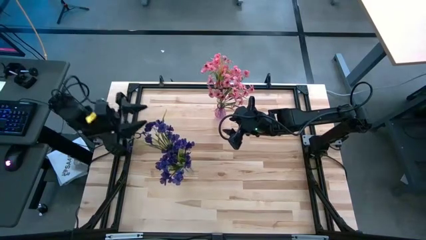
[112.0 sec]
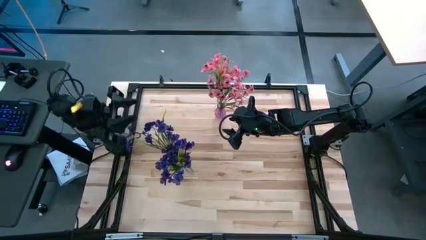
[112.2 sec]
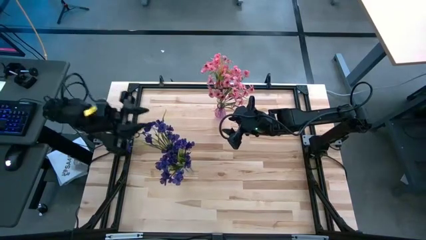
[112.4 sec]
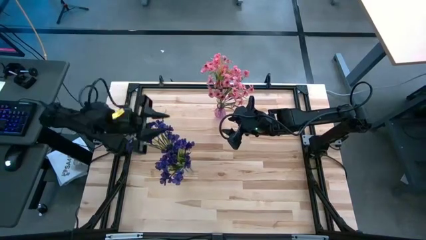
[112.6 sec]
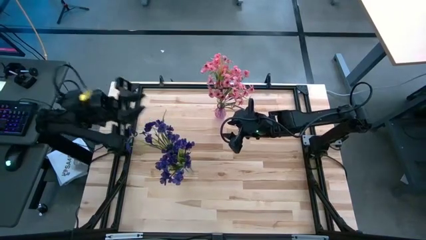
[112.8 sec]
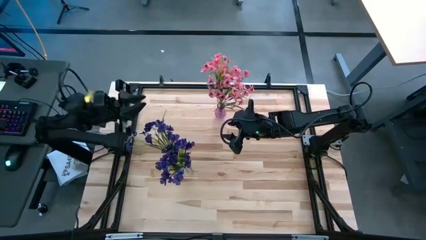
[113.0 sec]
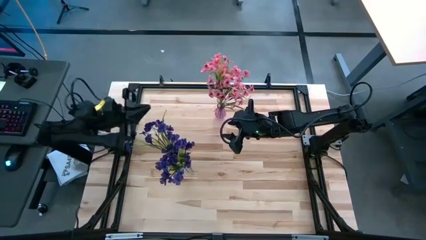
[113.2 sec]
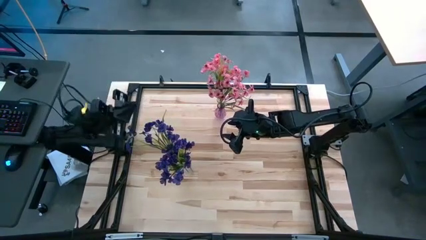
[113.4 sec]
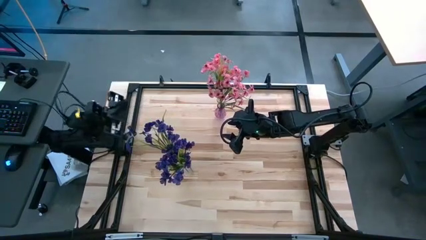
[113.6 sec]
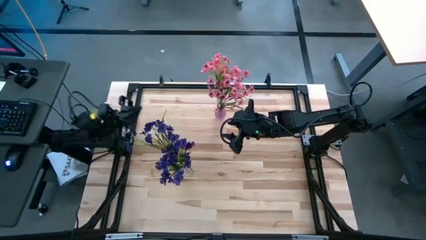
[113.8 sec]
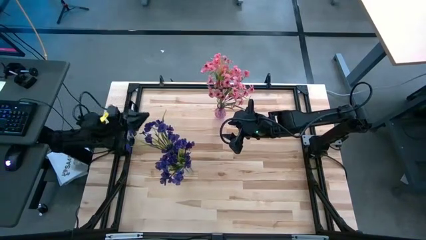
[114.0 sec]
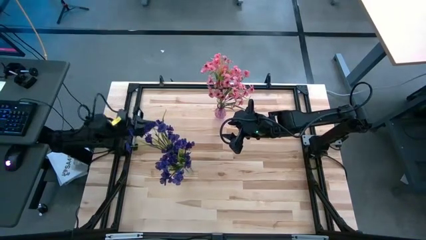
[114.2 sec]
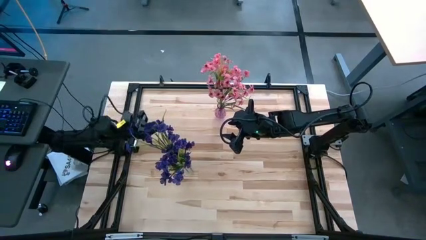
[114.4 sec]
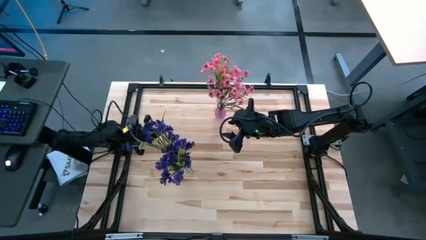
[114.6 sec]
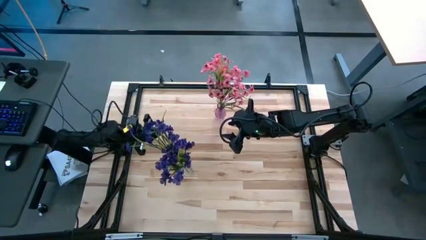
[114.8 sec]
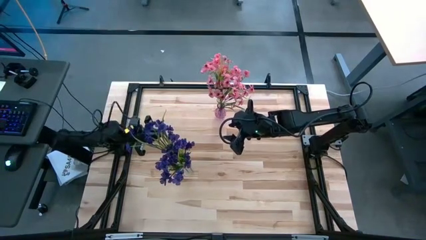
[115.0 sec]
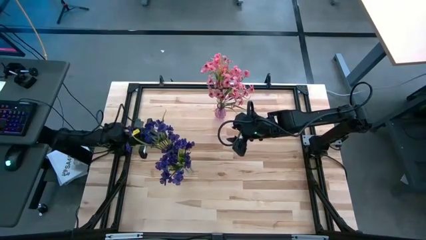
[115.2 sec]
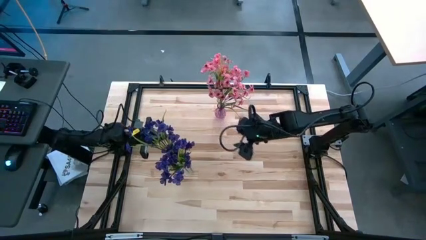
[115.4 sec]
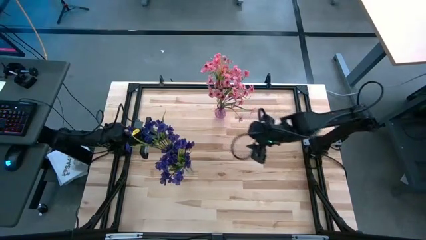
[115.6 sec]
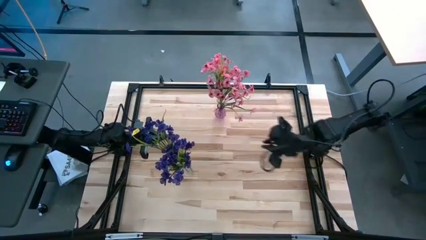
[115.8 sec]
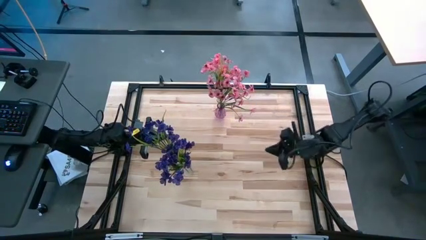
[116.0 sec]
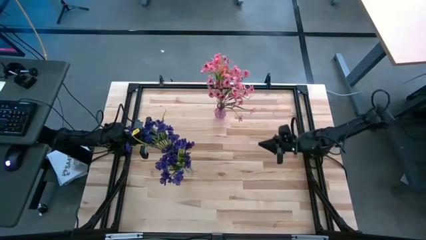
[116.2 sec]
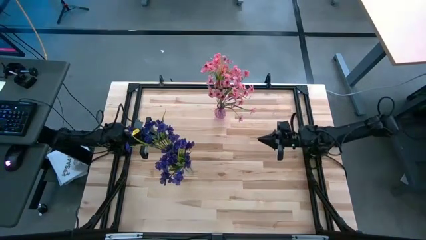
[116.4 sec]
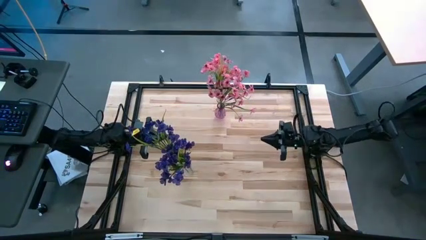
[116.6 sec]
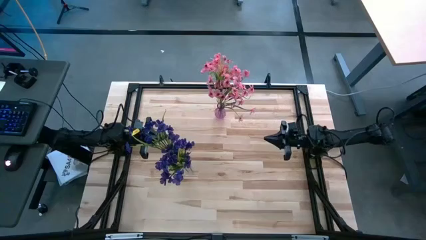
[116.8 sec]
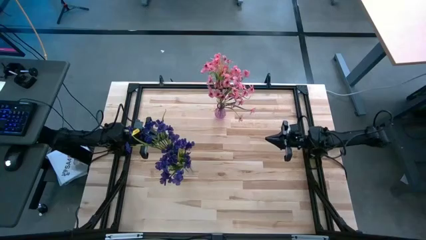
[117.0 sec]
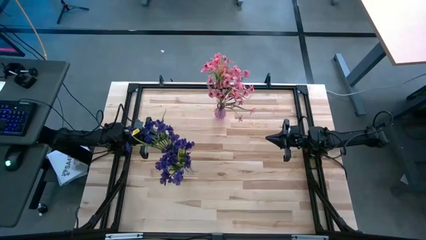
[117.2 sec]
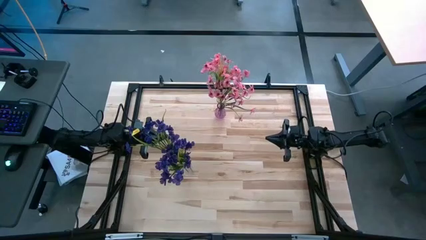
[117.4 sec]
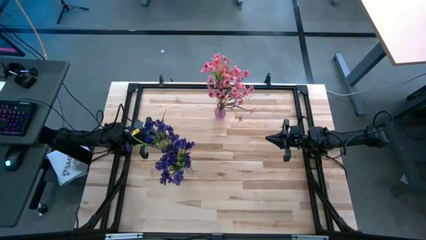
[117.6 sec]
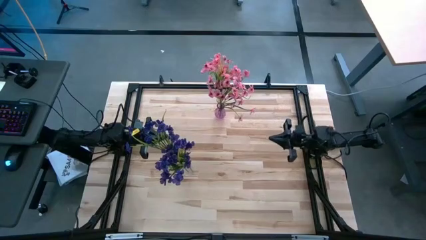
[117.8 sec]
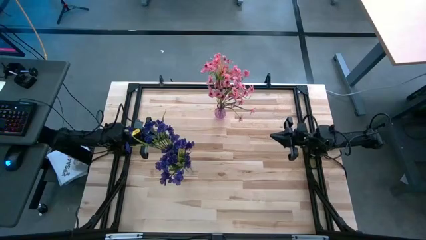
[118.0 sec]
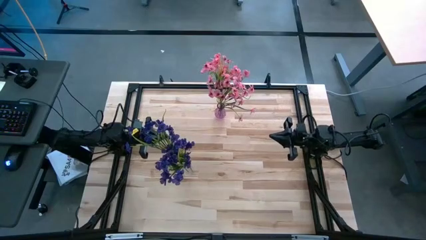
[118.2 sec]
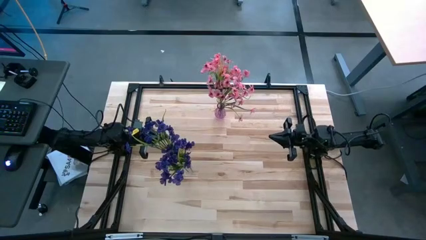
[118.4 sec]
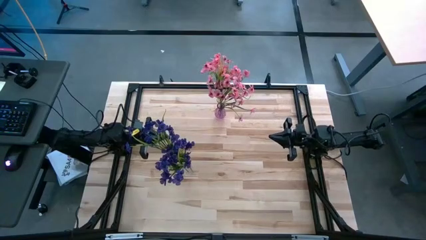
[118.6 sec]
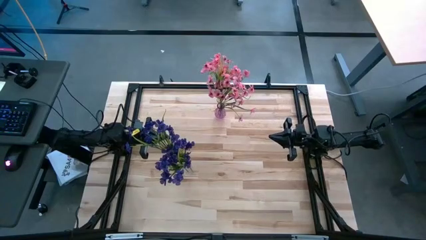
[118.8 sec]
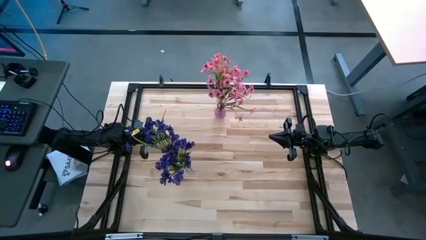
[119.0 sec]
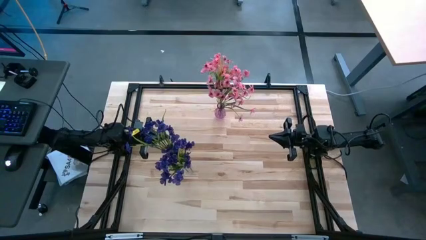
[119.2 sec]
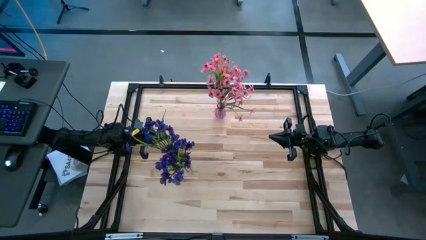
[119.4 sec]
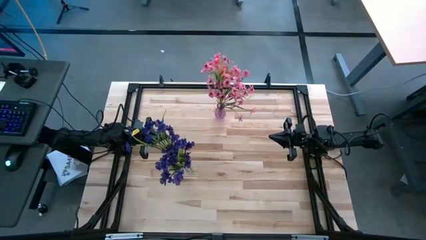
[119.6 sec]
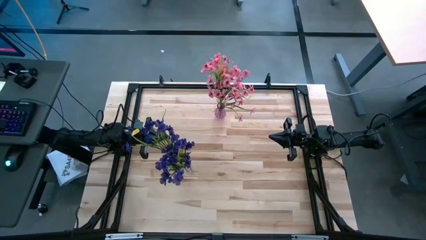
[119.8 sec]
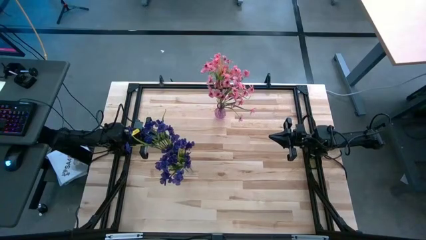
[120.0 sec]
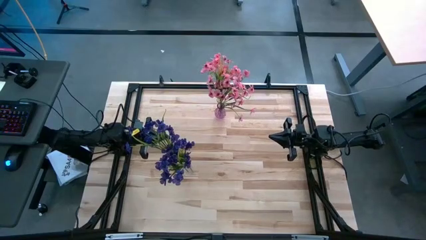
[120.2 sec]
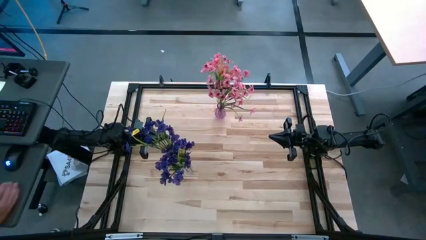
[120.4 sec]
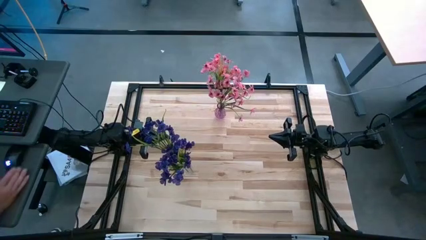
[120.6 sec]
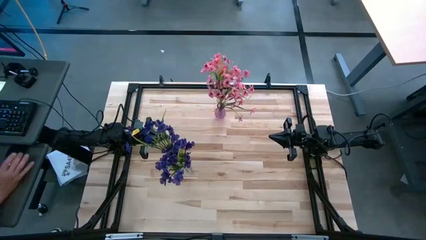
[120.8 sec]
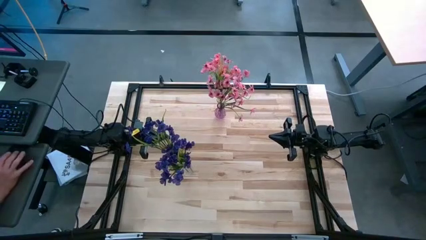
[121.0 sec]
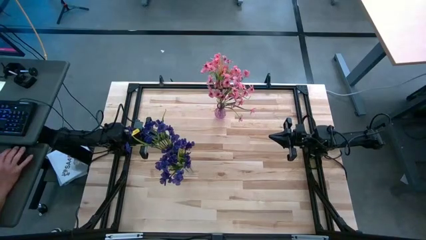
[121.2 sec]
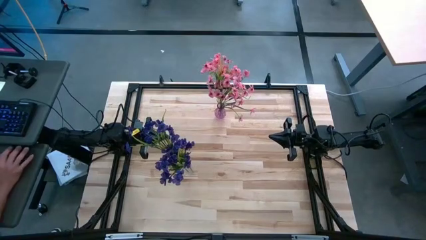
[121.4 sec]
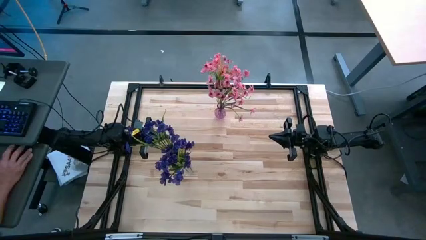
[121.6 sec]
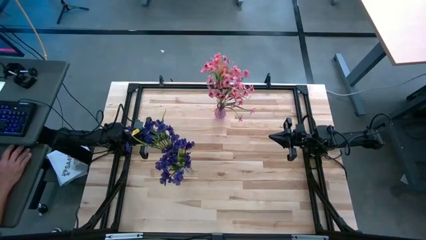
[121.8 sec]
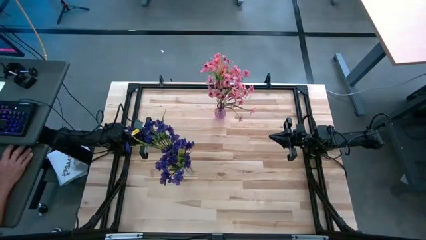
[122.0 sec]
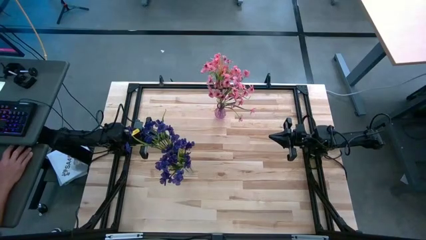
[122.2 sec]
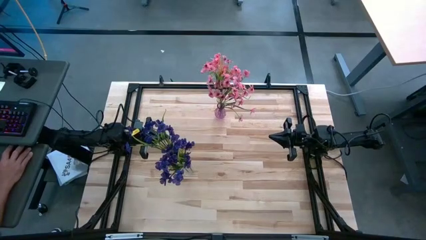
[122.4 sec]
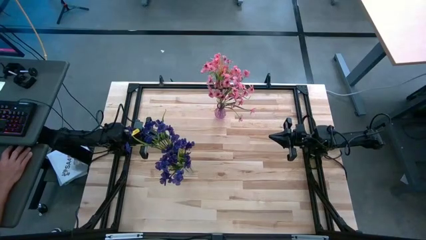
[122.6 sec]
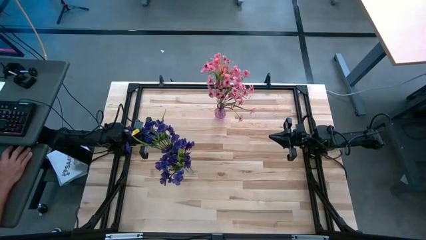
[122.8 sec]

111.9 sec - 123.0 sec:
Task: Sort flowers into vase by color
Return to Home Position

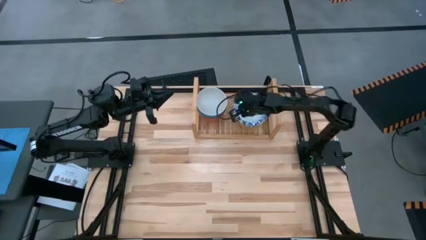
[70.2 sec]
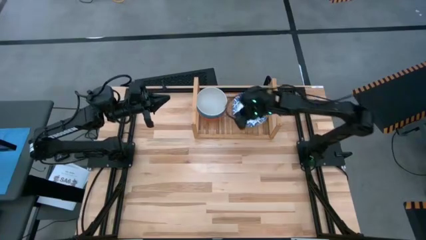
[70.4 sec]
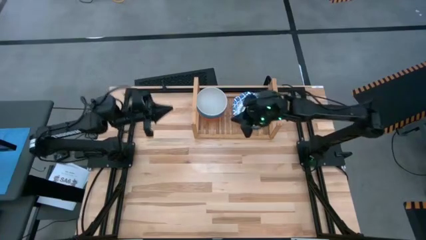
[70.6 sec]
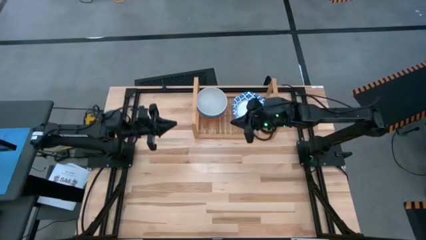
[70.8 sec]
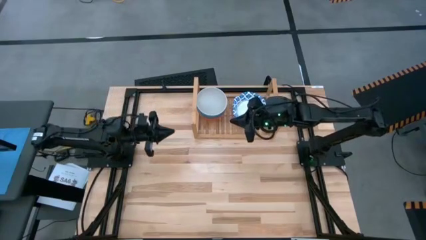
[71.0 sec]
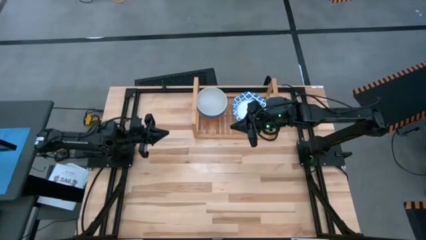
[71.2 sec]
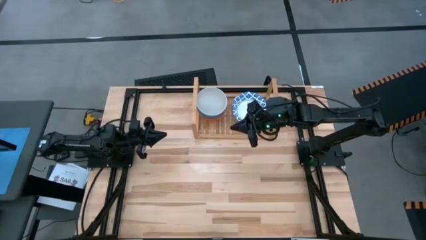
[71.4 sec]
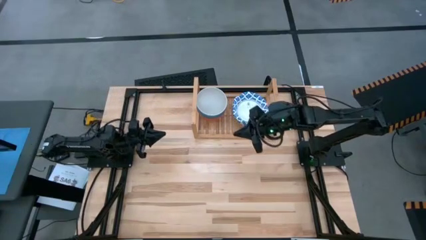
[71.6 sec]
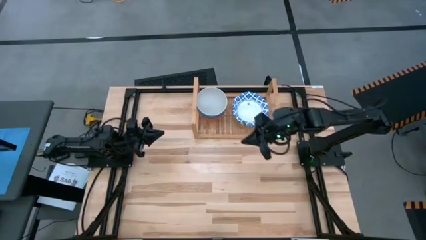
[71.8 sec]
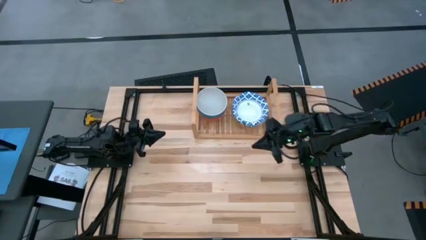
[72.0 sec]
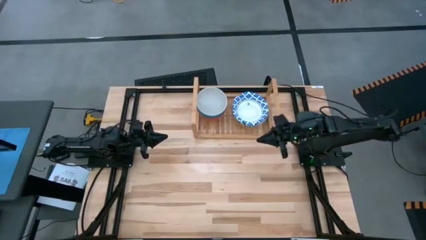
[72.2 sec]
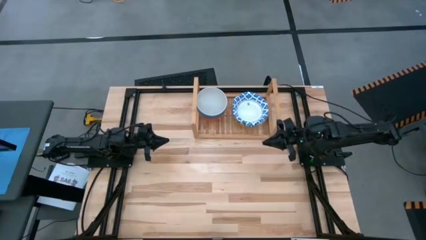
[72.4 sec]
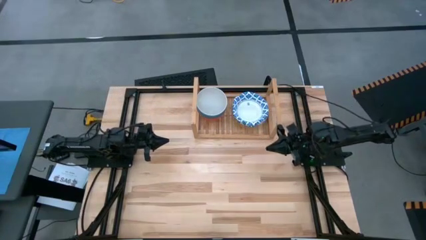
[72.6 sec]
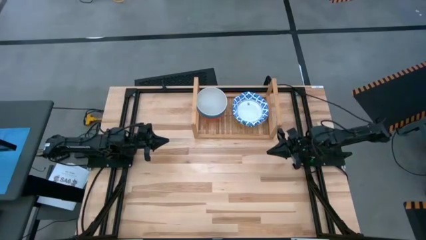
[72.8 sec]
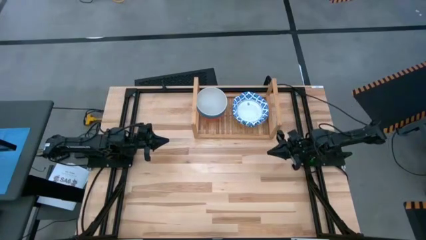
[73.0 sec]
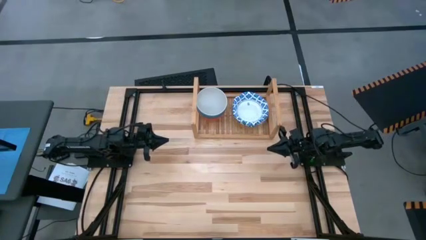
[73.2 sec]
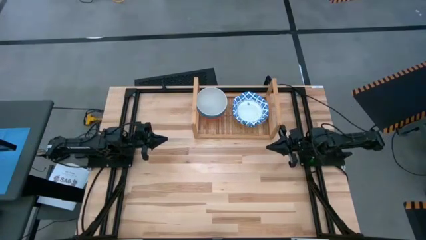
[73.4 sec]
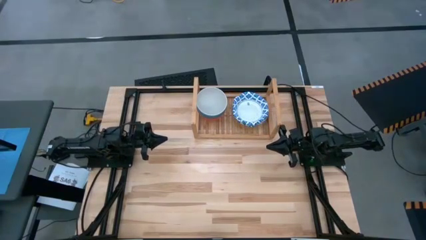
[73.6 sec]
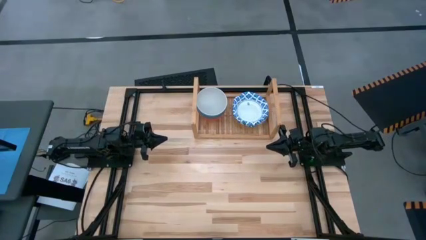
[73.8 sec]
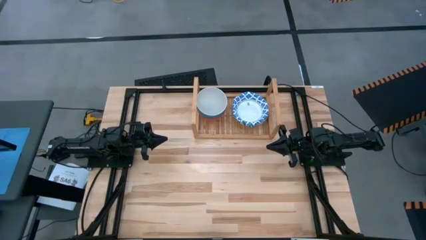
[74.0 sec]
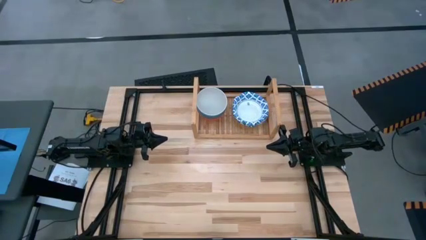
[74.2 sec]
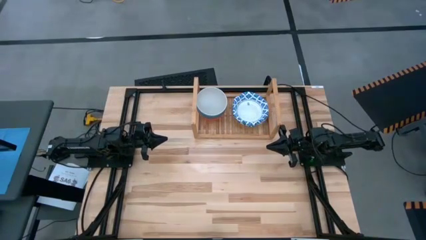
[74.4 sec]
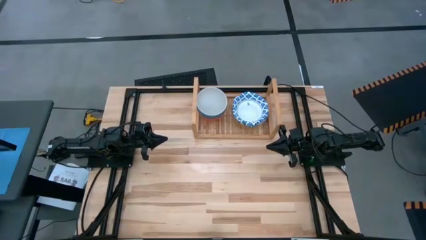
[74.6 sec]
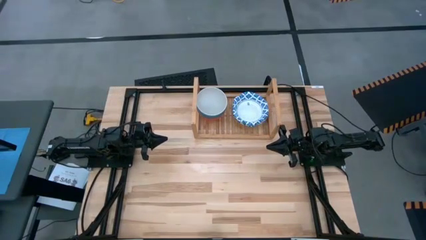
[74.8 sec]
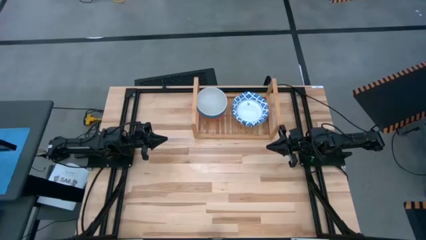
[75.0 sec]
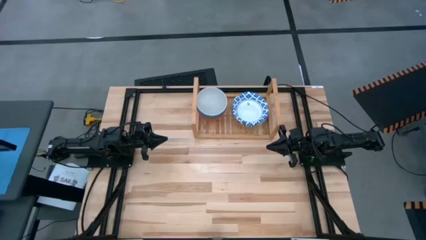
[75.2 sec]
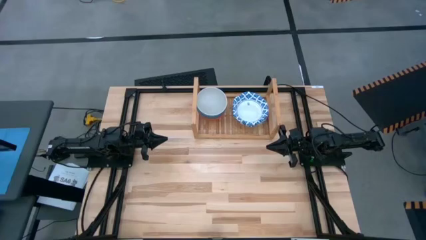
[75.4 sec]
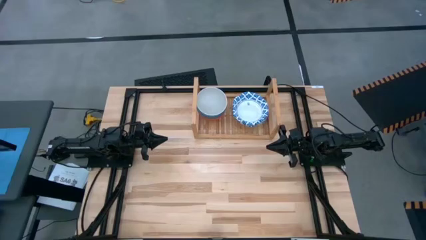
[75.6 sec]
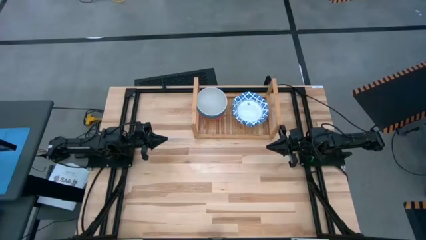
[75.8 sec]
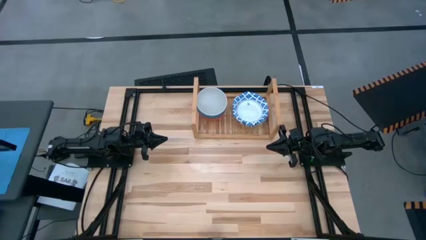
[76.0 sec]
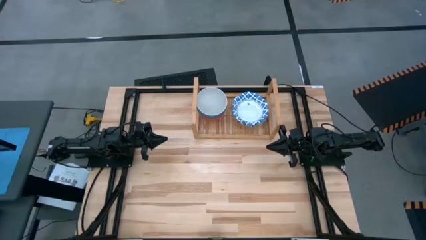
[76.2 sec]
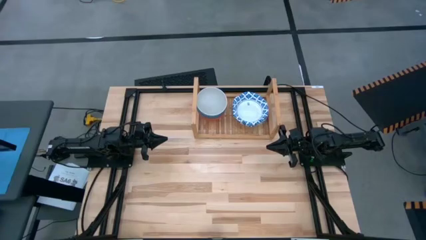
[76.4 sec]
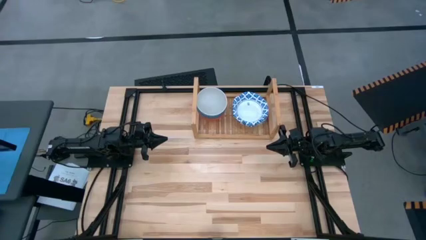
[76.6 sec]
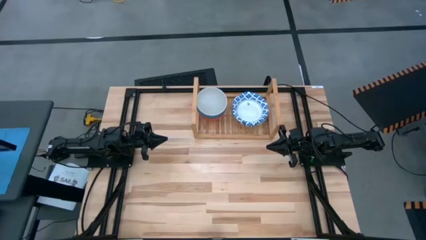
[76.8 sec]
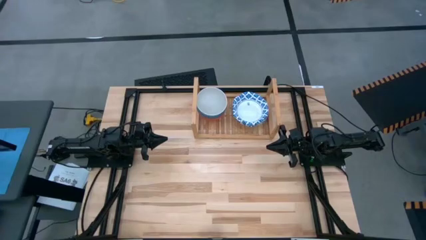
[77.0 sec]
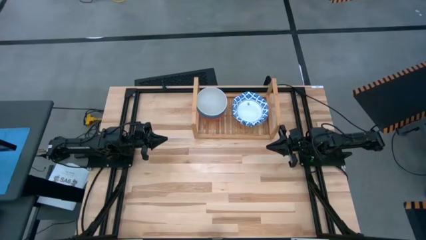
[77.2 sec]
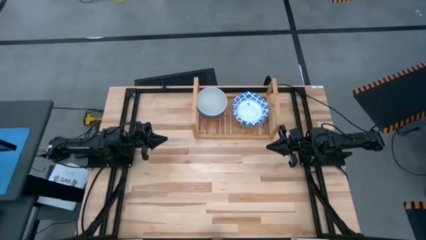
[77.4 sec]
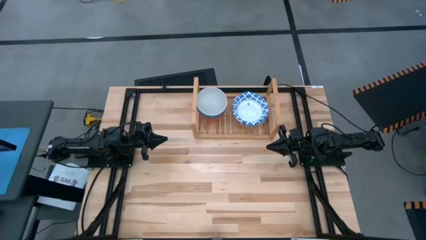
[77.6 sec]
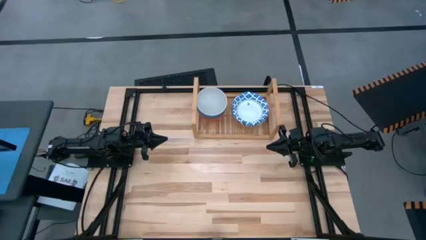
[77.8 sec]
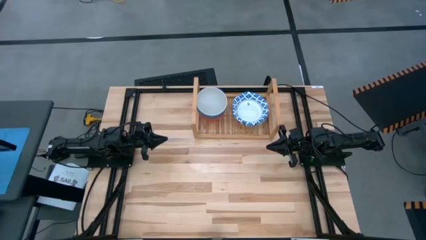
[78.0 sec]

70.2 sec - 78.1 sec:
Task: Place and stack bowls onto a shelf
Return to Home Position
